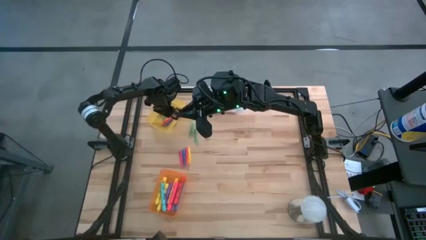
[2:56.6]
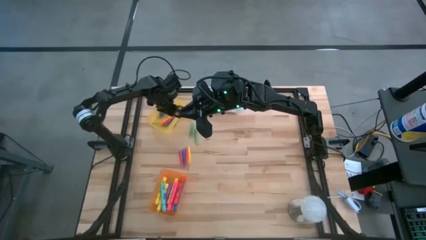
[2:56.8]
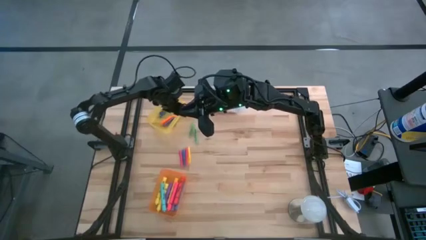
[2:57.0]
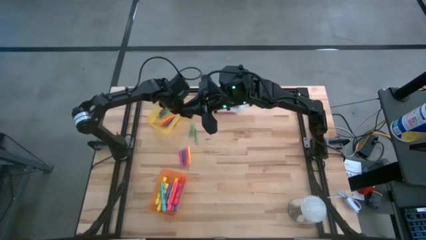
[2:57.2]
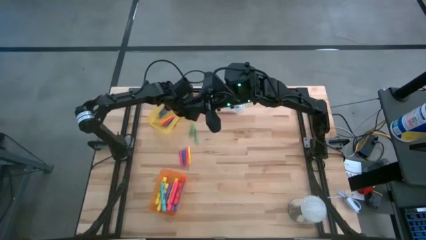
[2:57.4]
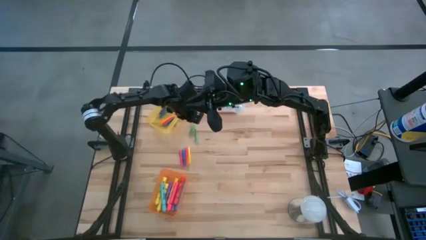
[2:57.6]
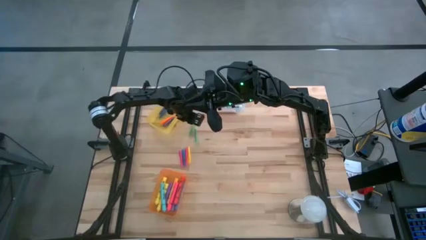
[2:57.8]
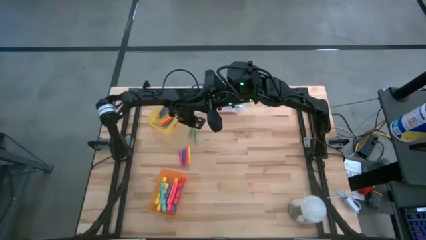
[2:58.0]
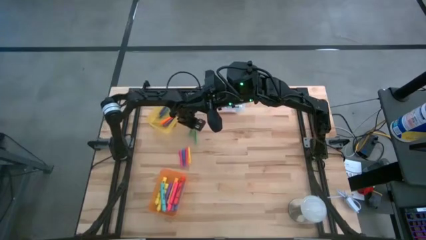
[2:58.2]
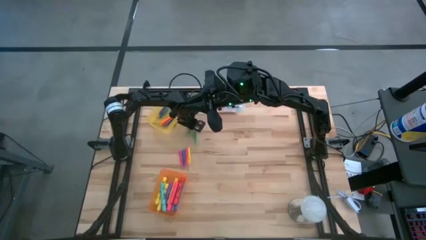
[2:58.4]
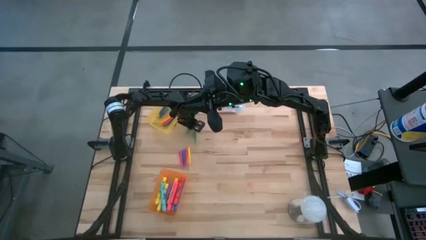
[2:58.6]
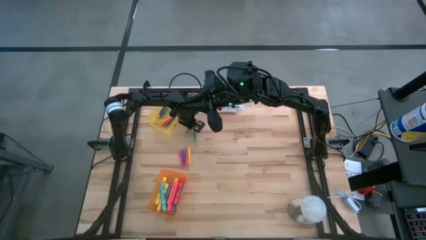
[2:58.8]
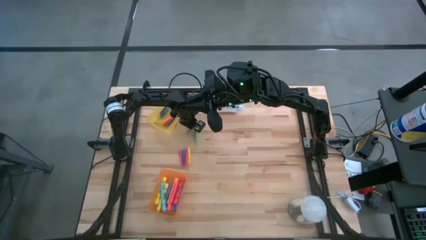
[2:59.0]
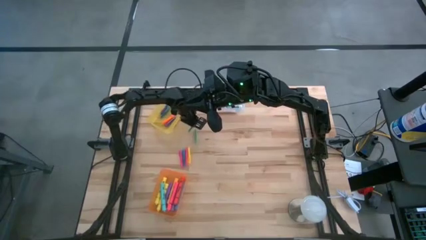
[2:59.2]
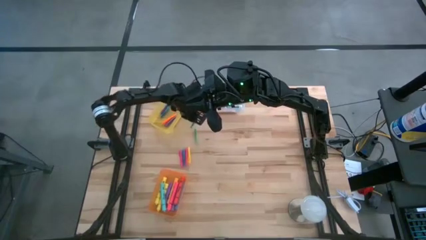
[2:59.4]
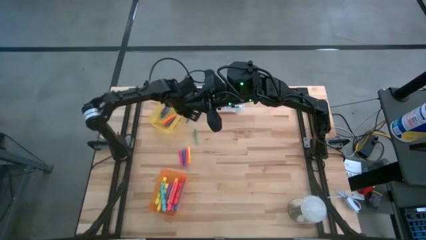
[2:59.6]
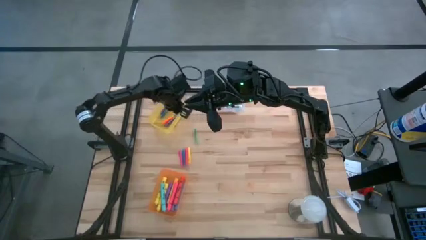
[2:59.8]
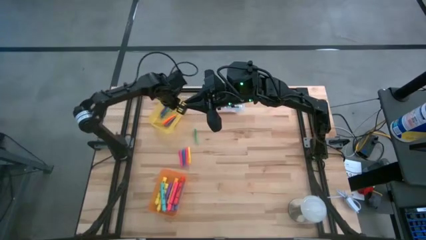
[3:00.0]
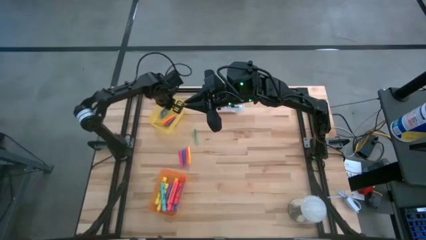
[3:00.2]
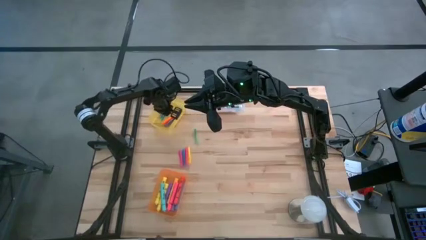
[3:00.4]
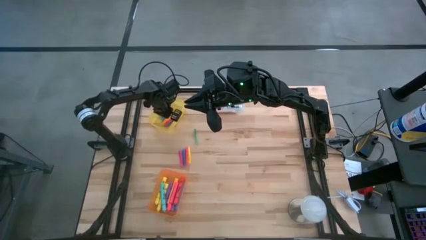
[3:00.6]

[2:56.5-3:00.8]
Task: Pick & Place Markers
Put the left green pen into the yellow bin

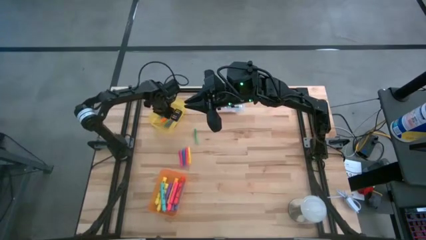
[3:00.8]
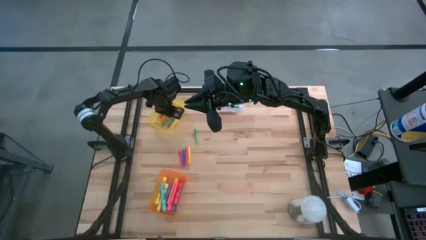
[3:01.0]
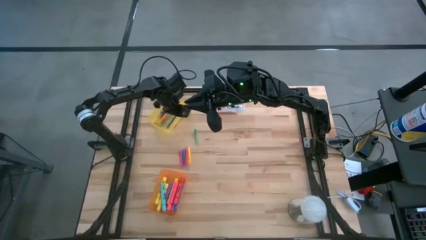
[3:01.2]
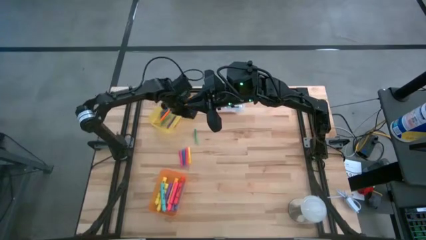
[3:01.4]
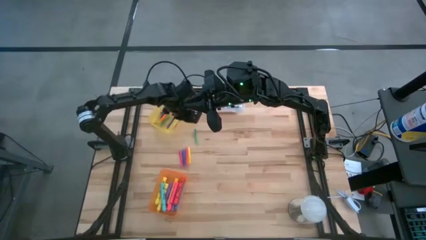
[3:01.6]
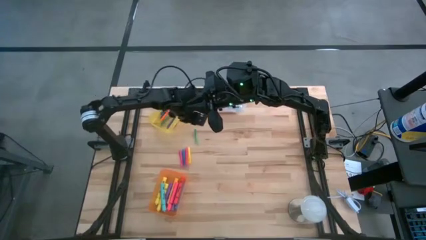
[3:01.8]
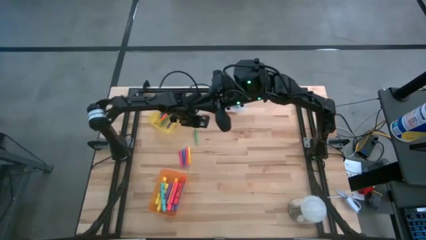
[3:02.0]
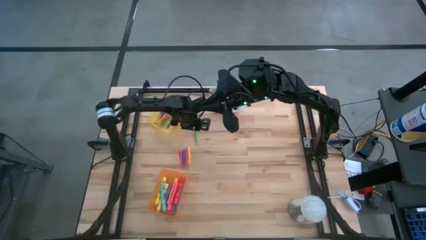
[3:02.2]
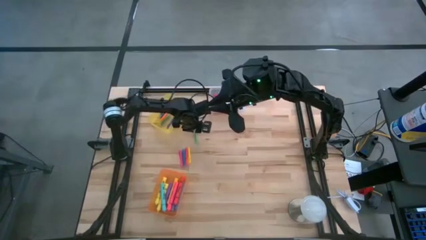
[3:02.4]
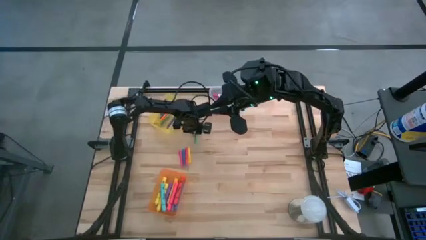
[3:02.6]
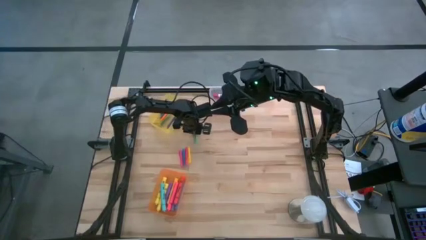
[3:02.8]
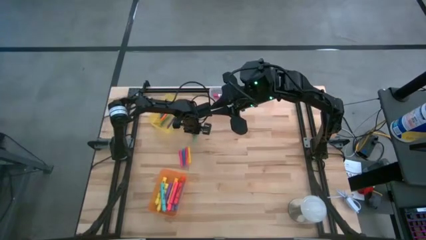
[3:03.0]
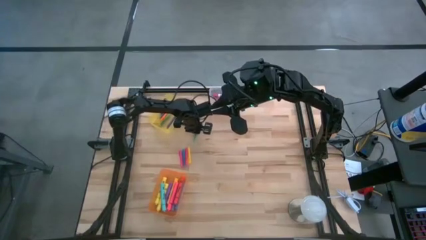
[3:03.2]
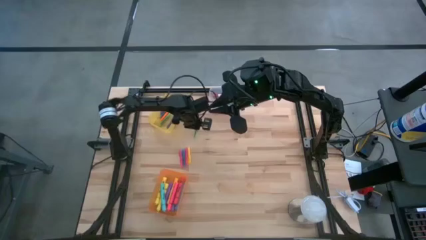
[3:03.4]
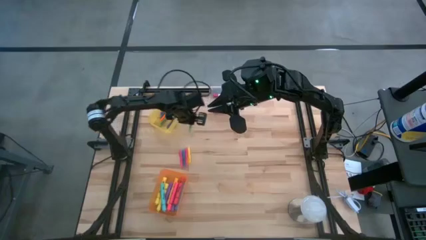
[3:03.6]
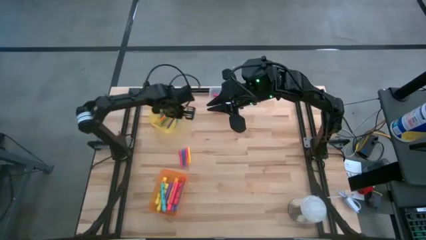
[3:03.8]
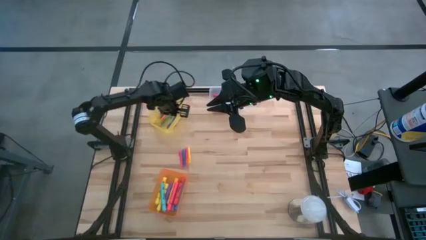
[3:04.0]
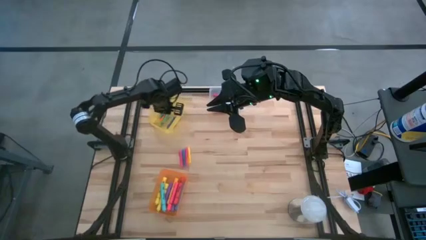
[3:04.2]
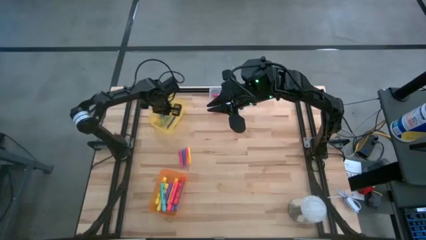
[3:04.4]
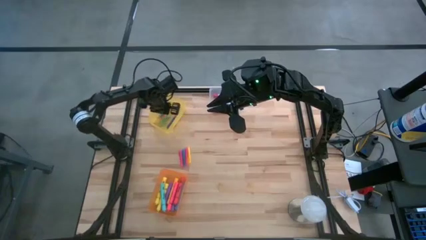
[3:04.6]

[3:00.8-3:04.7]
Put the green pen into the yellow bin

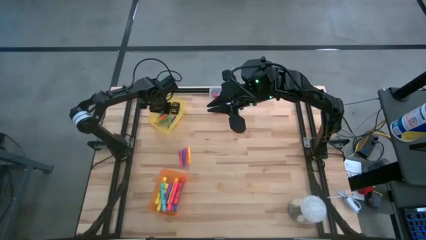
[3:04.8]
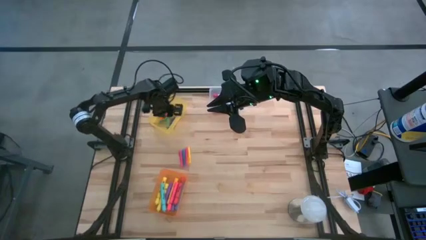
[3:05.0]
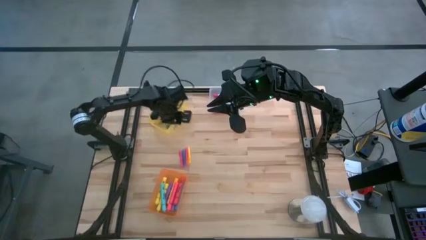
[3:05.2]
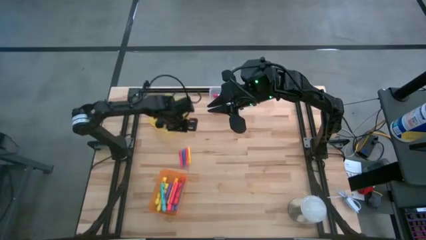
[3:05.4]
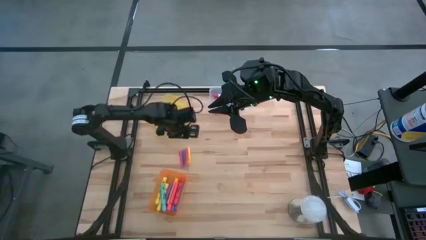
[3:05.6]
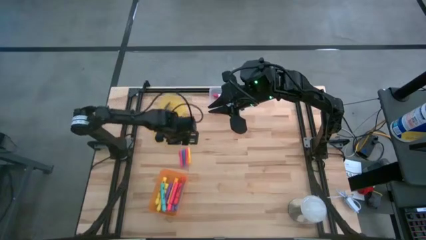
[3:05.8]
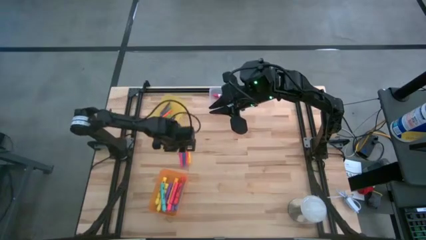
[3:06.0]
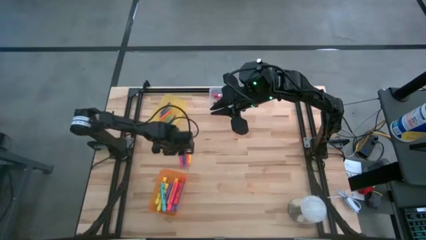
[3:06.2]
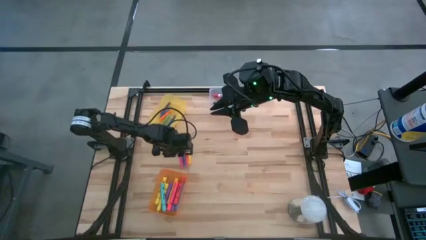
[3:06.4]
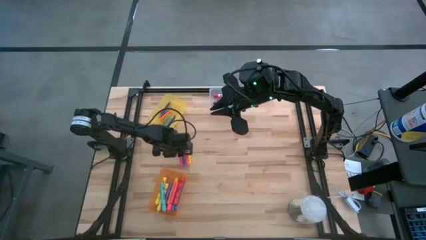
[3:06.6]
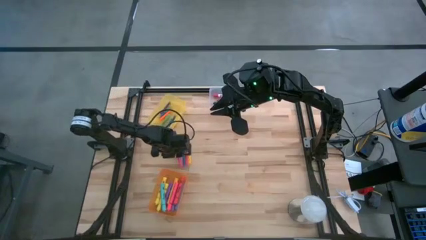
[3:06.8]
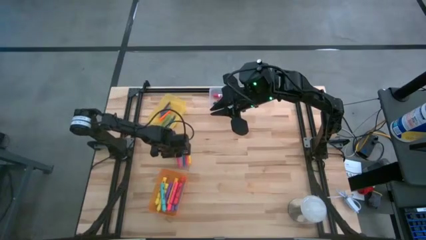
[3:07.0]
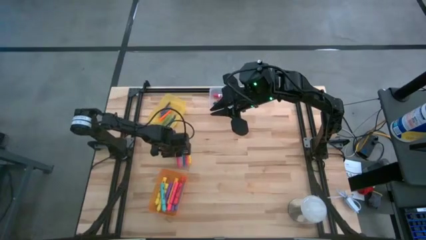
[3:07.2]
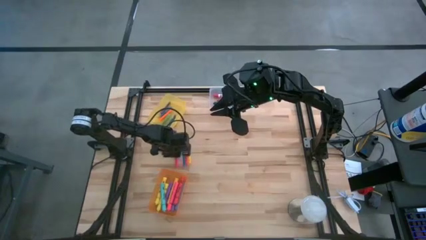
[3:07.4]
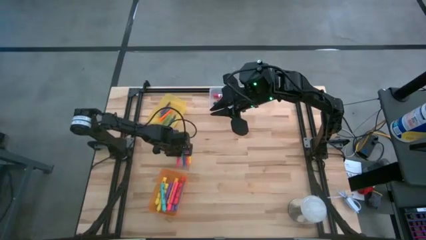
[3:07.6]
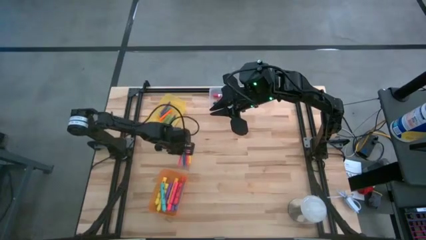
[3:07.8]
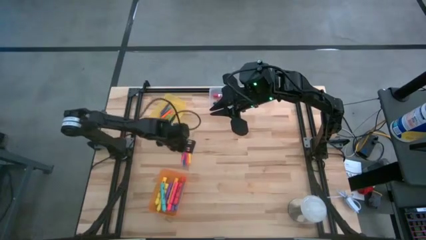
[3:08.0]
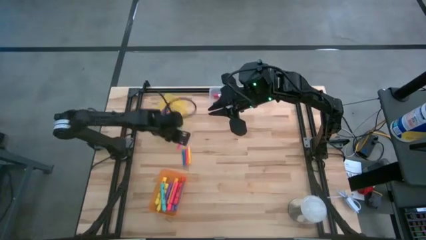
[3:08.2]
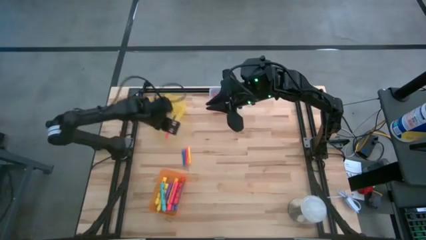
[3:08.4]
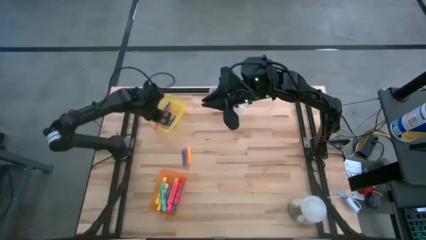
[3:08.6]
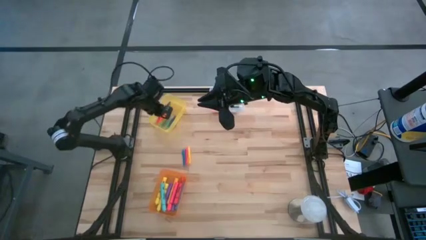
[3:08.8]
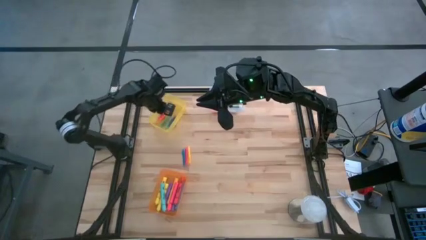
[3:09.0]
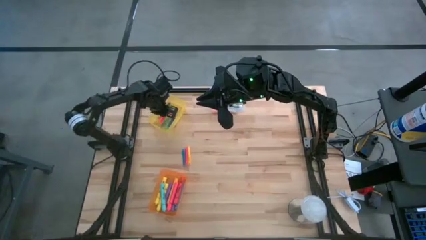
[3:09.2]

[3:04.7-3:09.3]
Put the left pink pen into the yellow bin

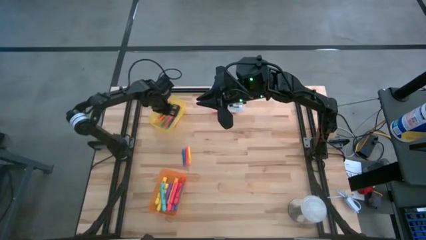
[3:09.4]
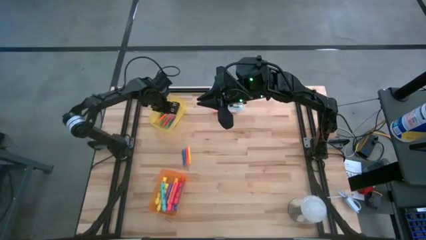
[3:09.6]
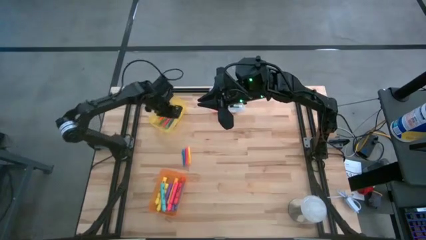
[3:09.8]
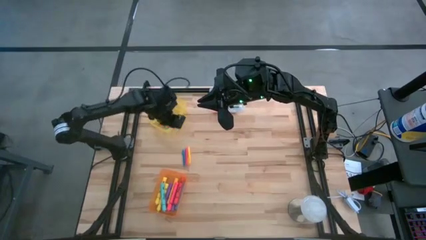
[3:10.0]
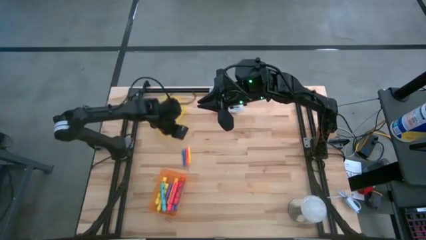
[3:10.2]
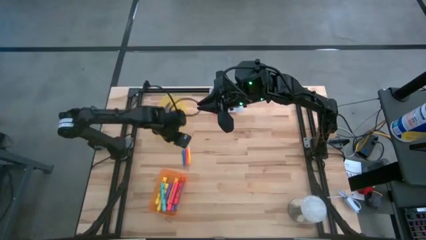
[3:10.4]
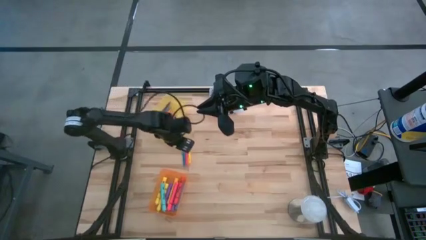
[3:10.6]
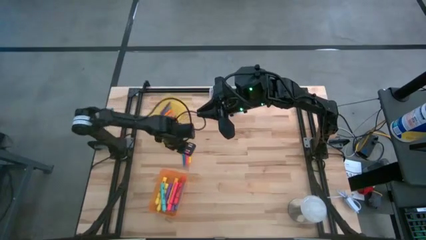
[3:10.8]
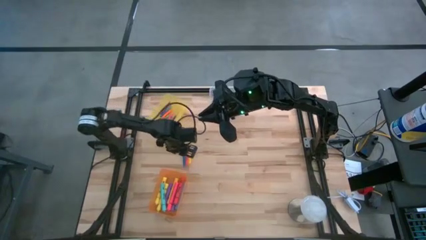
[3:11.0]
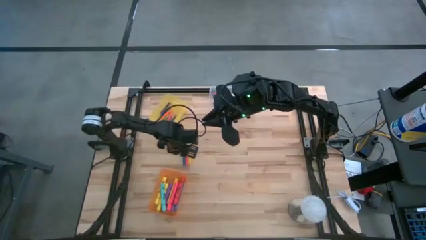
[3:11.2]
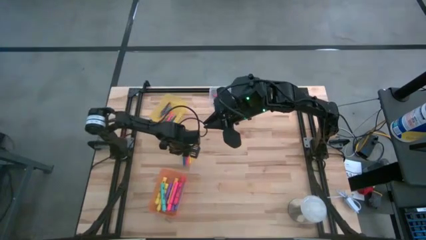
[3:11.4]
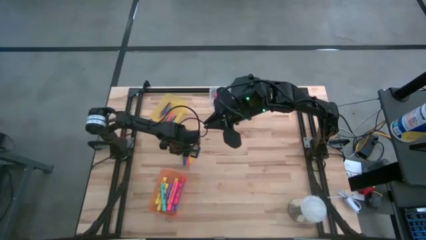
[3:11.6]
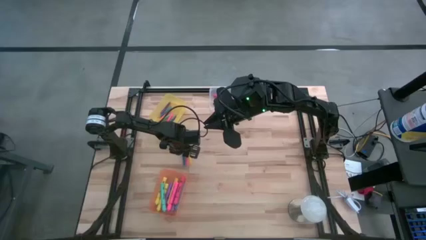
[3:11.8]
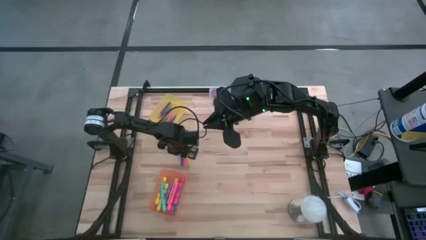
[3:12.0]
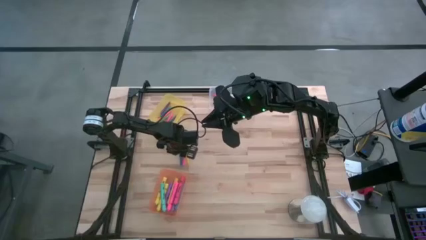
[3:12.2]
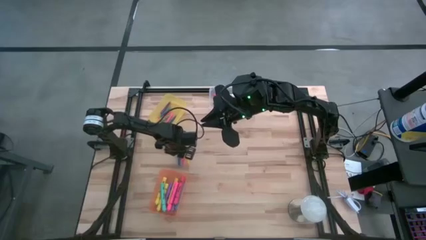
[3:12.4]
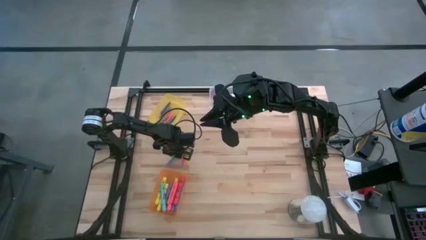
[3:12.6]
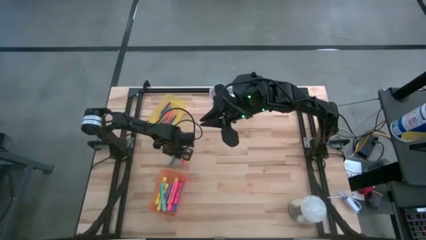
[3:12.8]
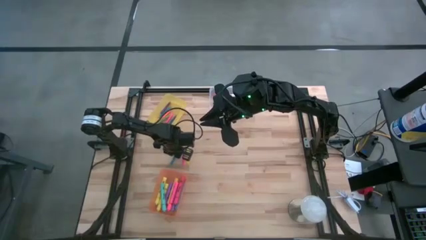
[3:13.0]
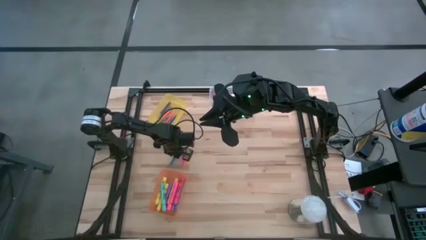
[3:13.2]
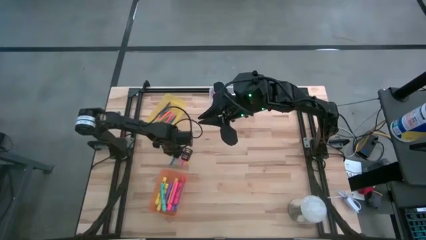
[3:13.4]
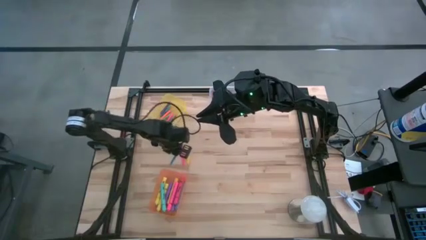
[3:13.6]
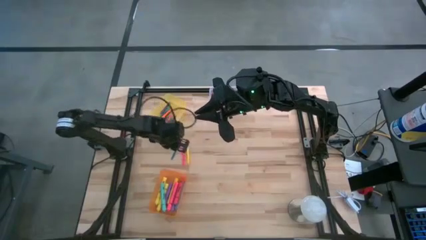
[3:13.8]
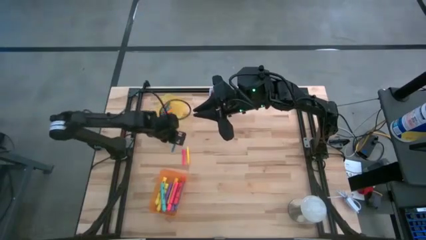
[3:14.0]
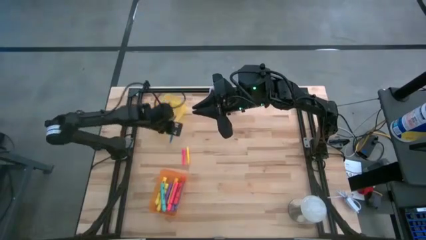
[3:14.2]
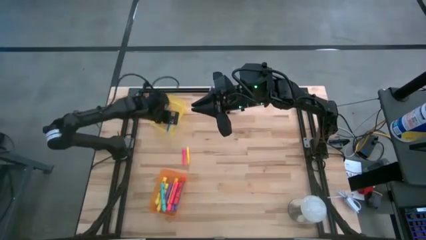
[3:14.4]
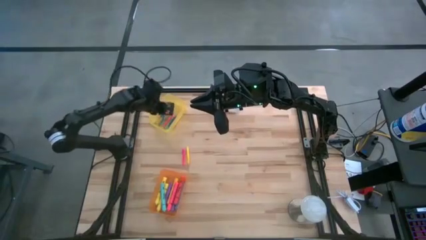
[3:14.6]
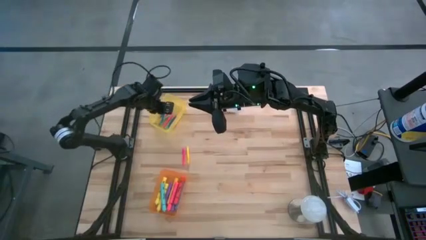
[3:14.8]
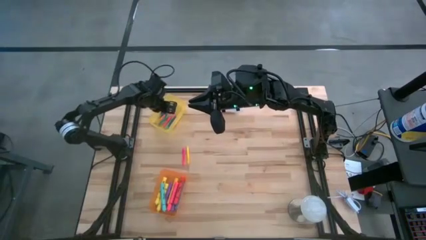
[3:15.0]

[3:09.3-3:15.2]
Put the blue pen into the yellow bin
